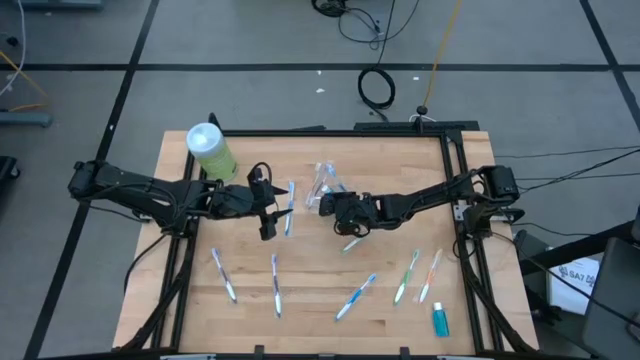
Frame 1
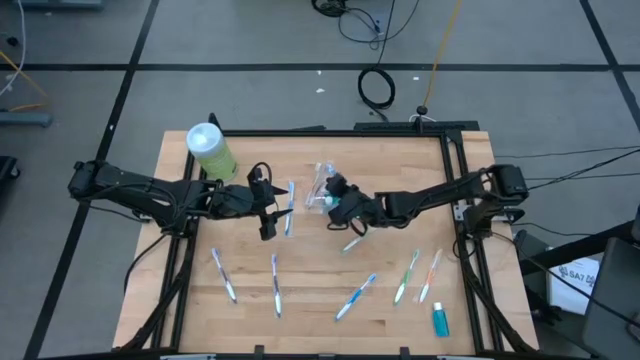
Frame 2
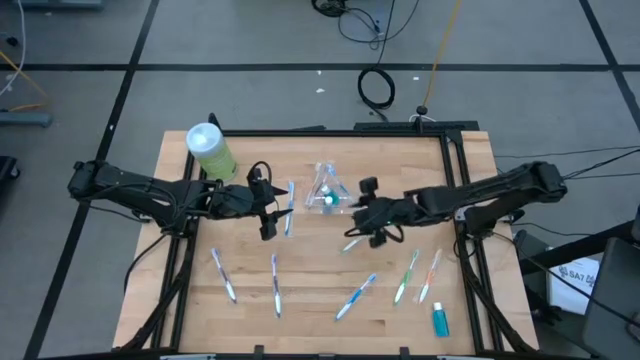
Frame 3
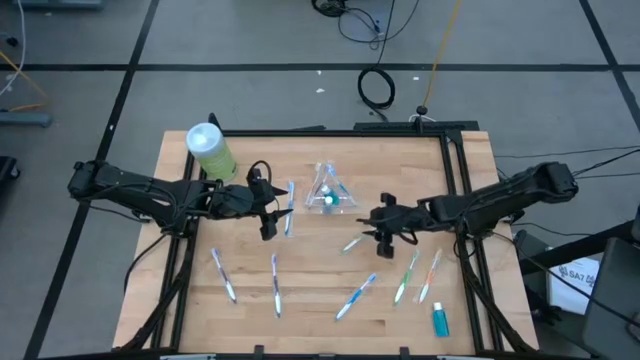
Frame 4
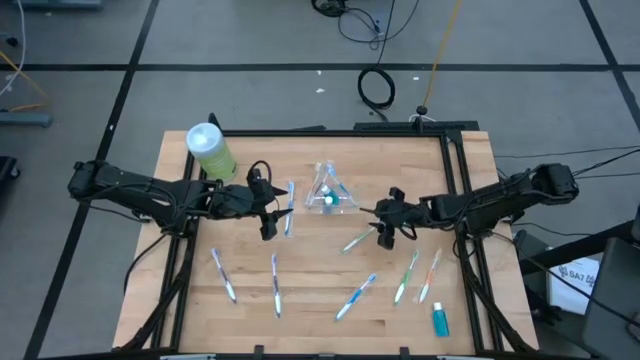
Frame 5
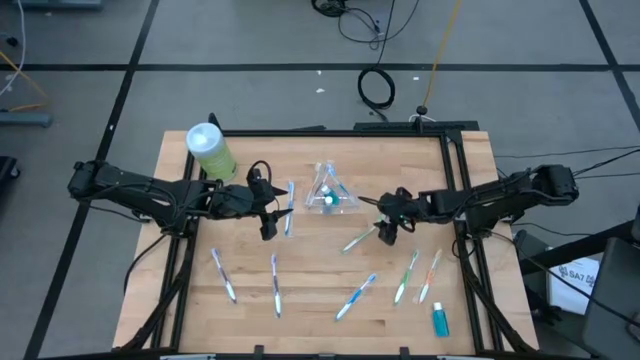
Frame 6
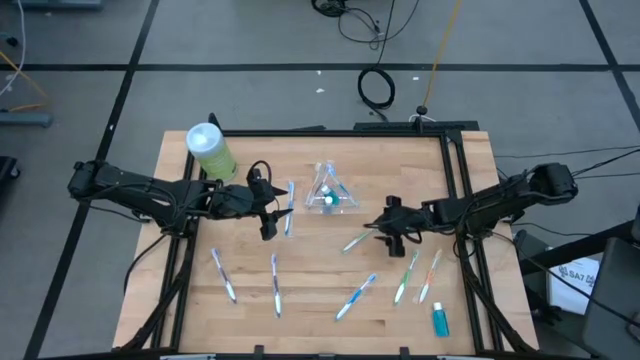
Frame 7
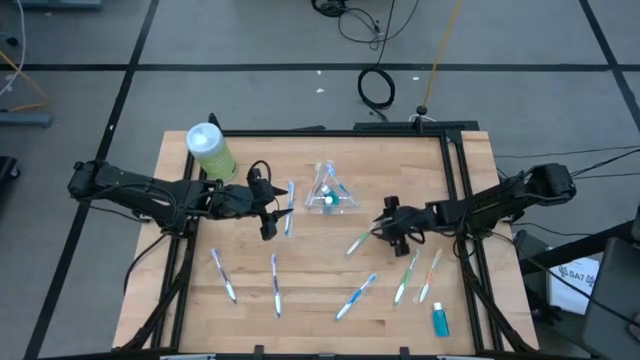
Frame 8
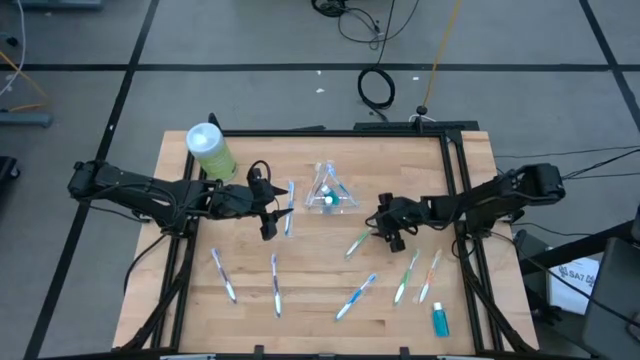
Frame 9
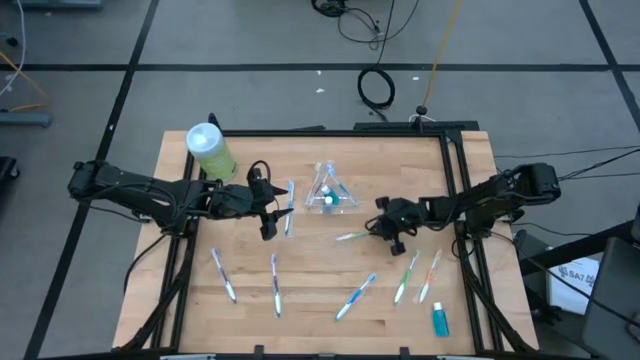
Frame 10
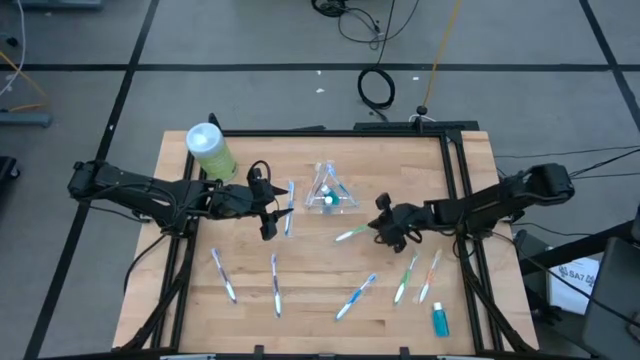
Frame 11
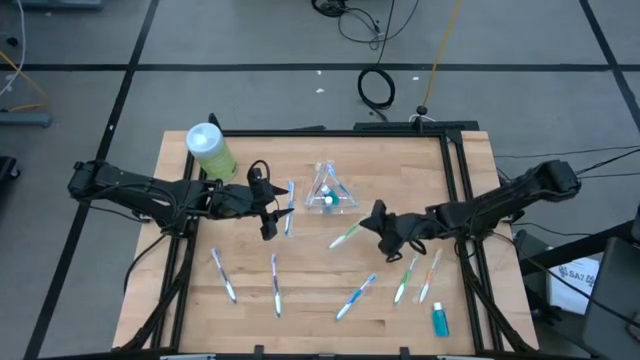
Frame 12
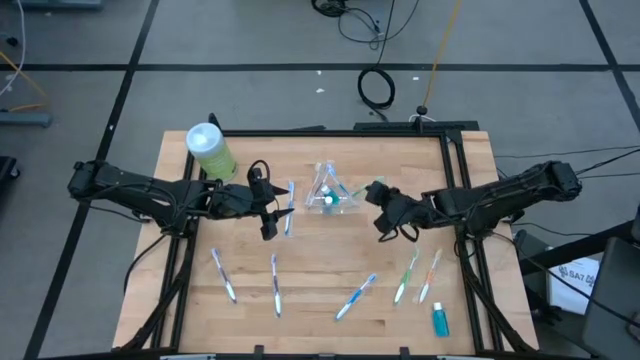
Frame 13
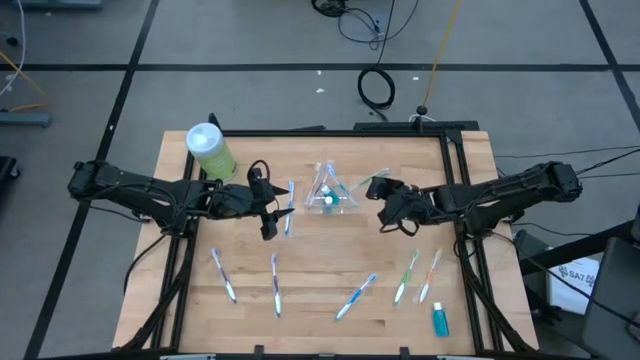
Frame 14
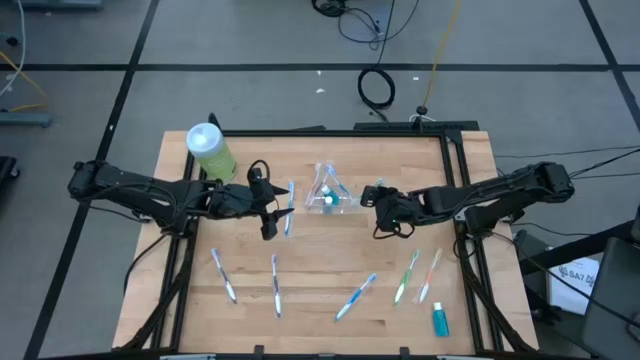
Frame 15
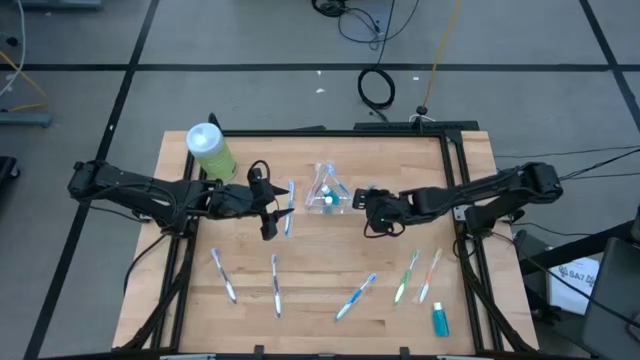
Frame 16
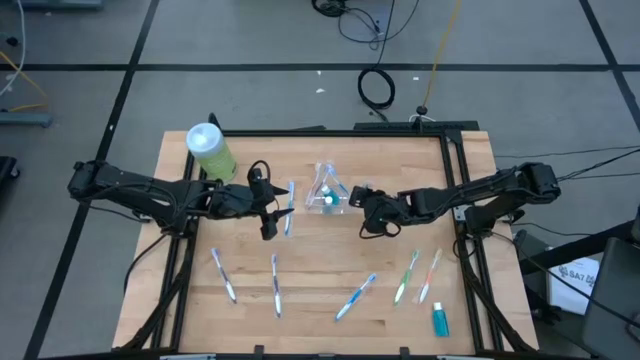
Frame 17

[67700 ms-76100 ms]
Task: Pick & Place toothbrushing station
Put the left green toothbrush into the right section of the transparent organizer

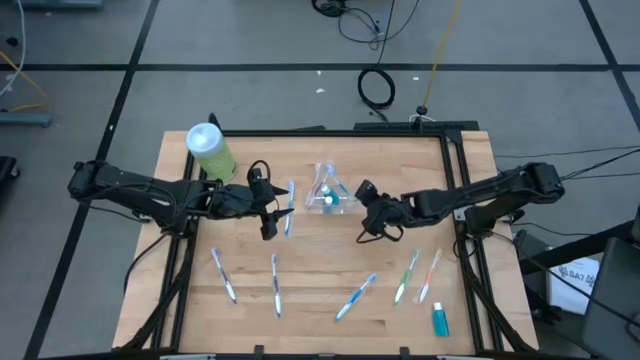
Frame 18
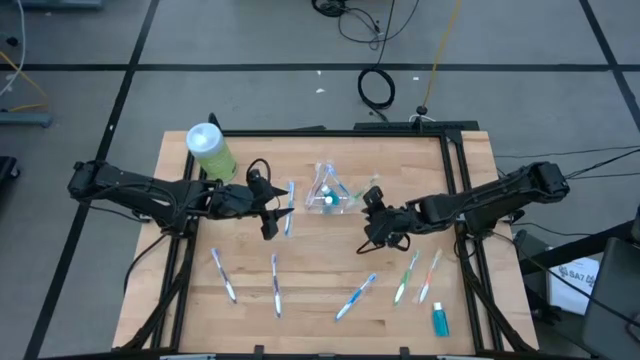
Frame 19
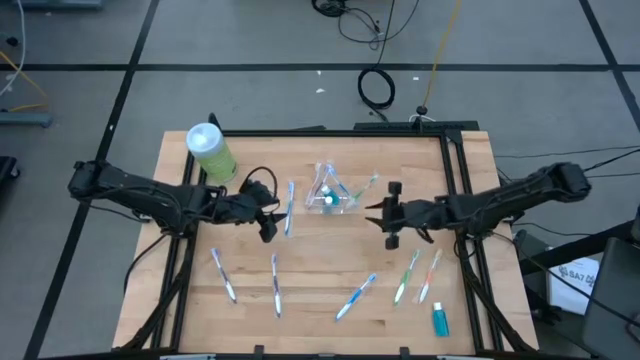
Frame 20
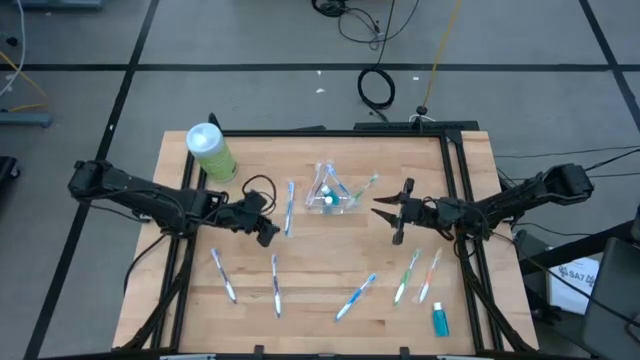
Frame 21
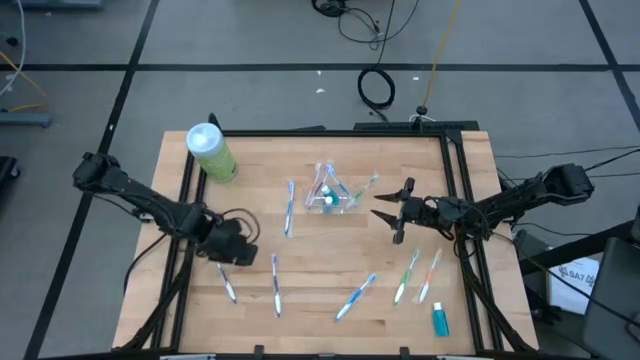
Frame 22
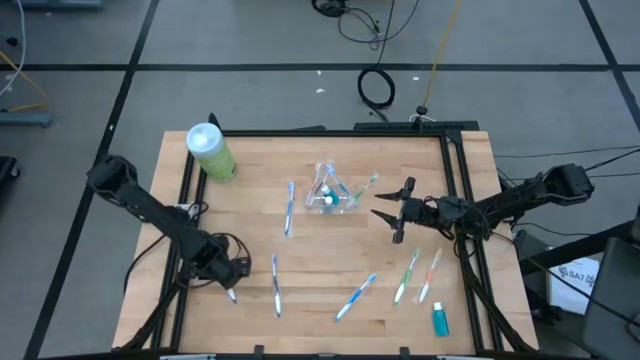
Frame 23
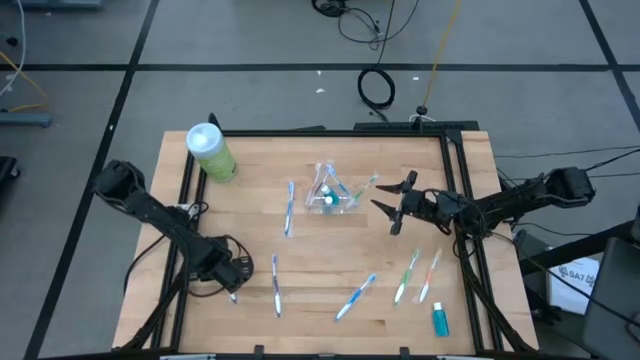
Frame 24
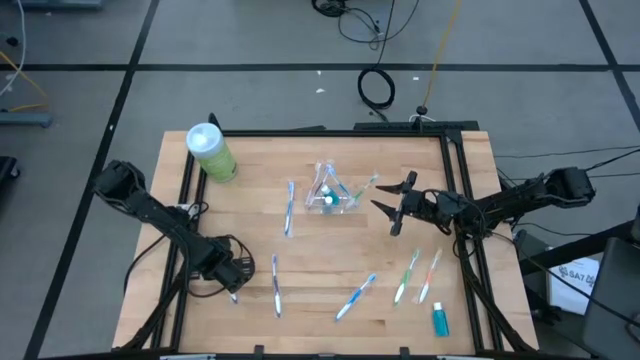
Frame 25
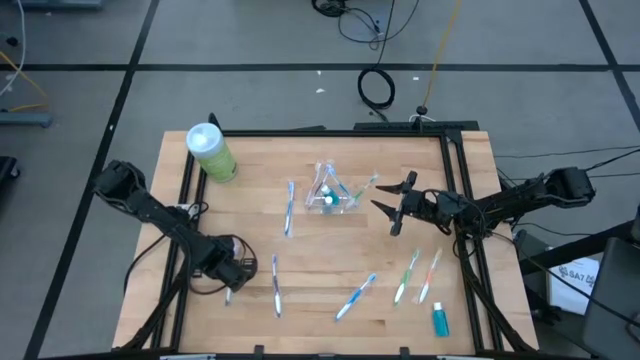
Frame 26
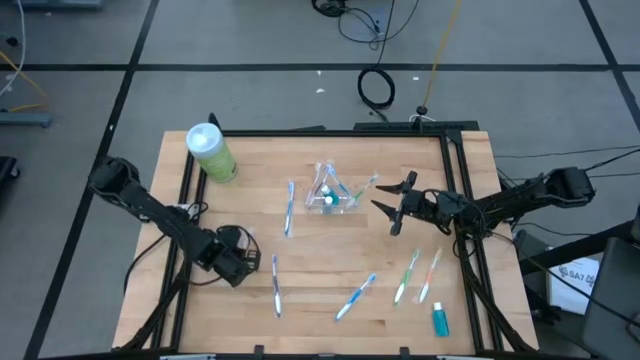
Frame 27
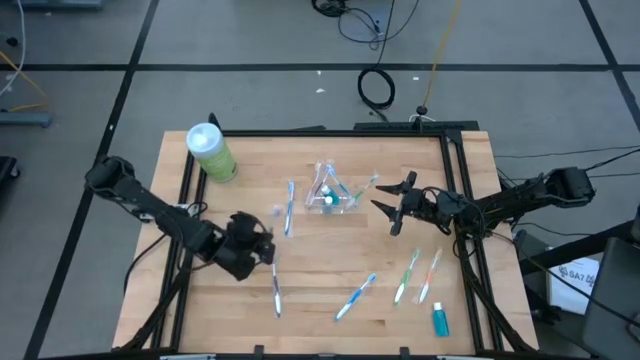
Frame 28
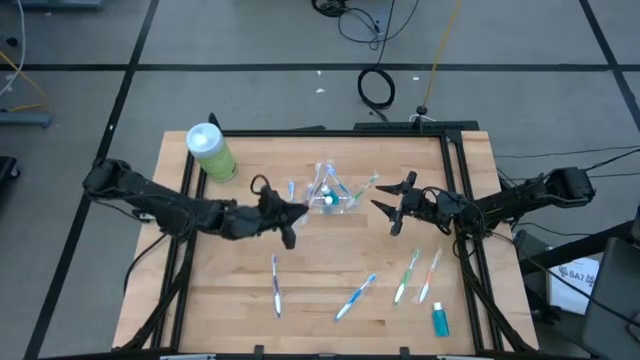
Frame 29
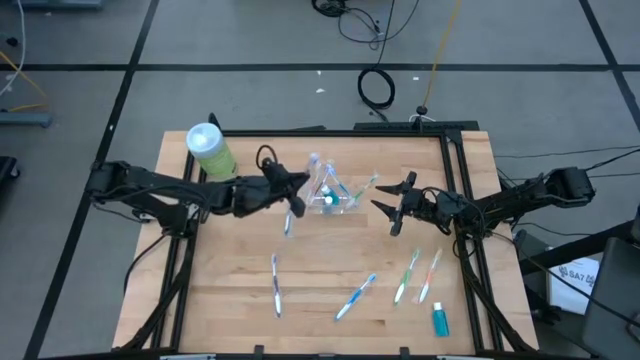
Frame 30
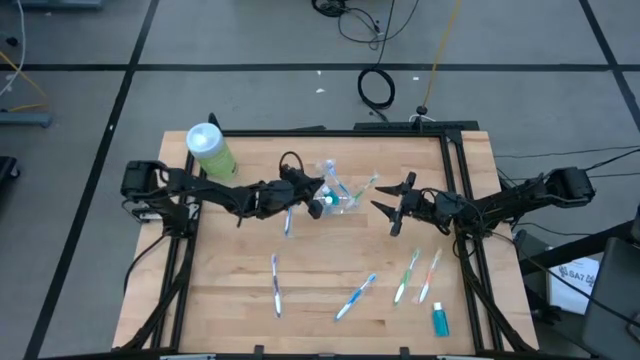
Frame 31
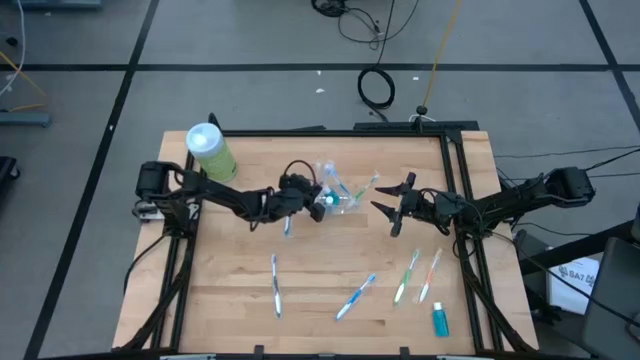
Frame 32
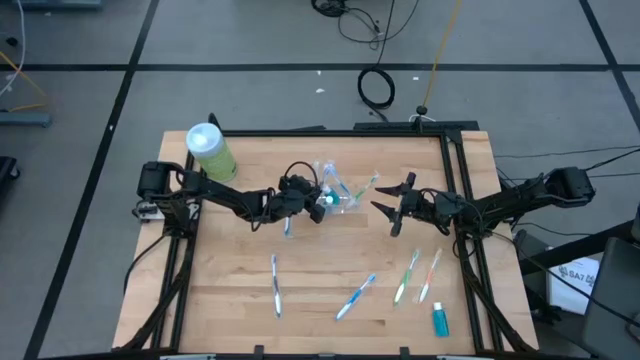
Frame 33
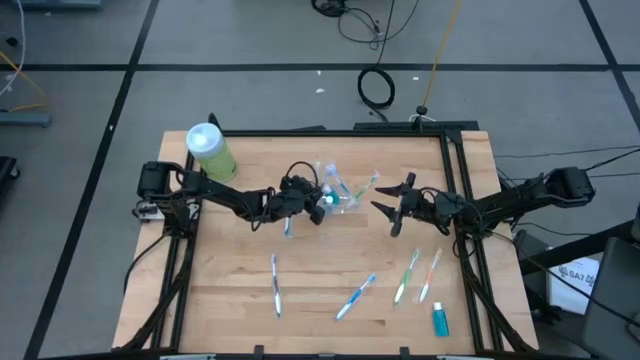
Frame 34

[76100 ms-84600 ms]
Put the right violet toothbrush into the left section of the transparent organizer

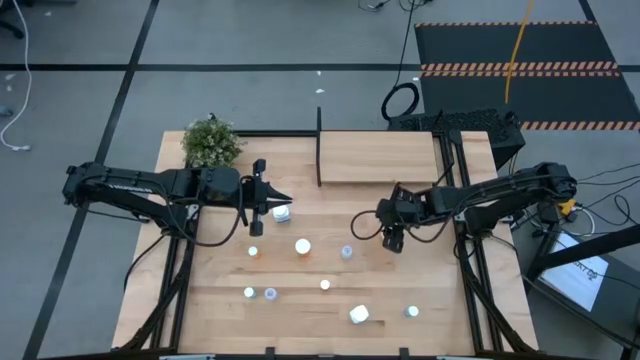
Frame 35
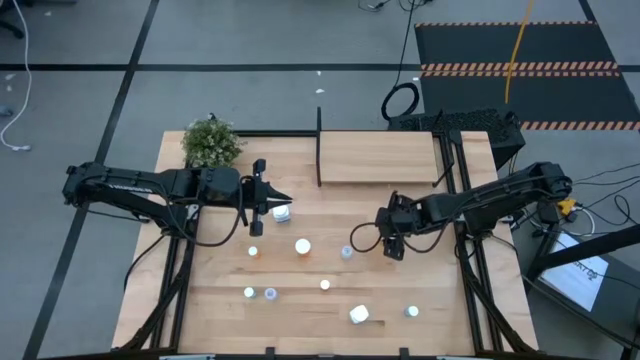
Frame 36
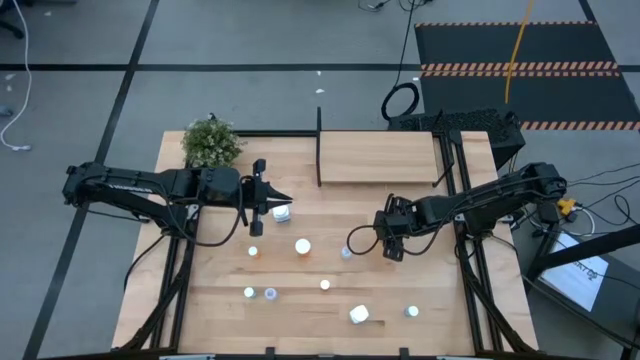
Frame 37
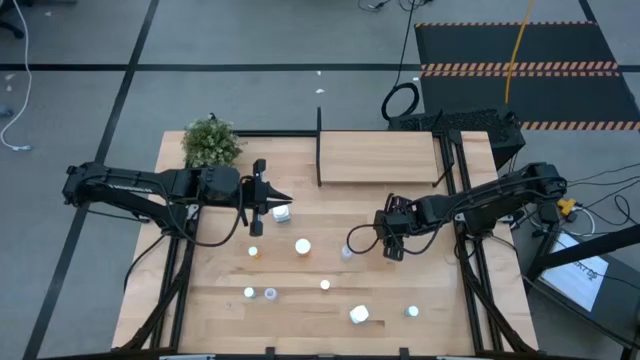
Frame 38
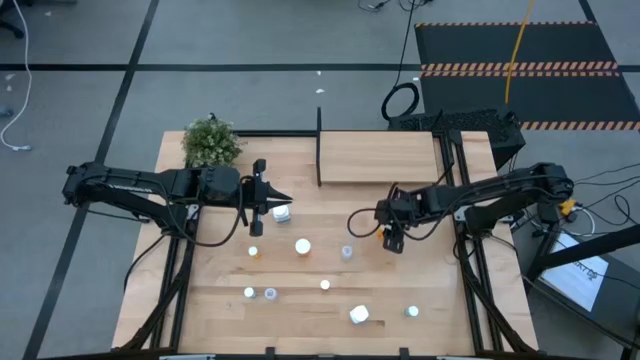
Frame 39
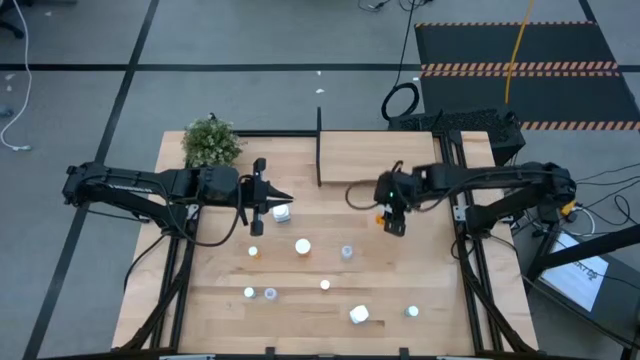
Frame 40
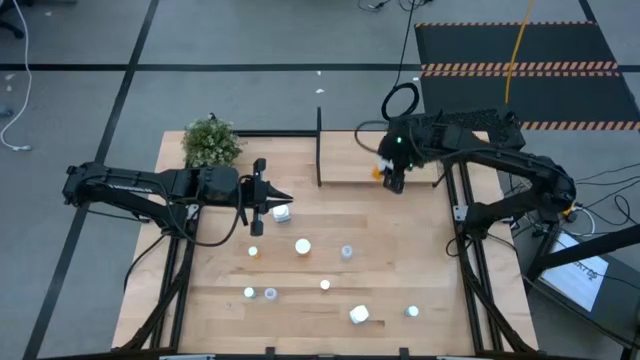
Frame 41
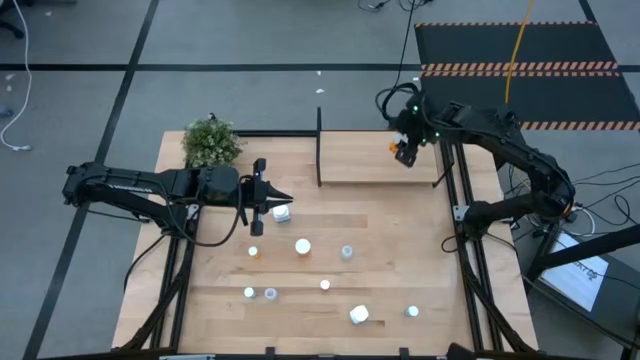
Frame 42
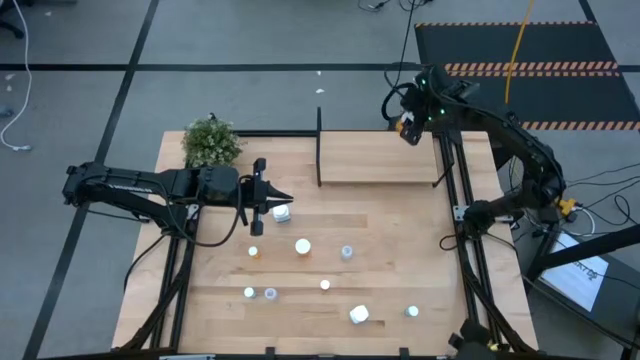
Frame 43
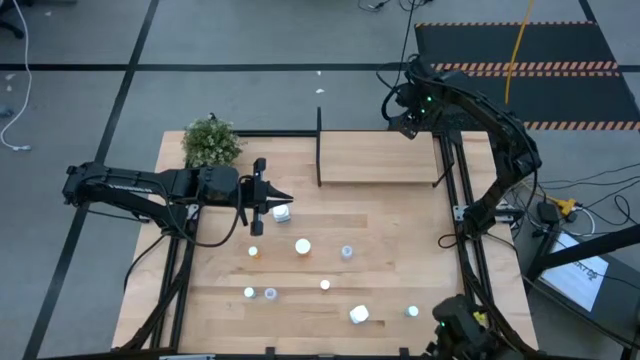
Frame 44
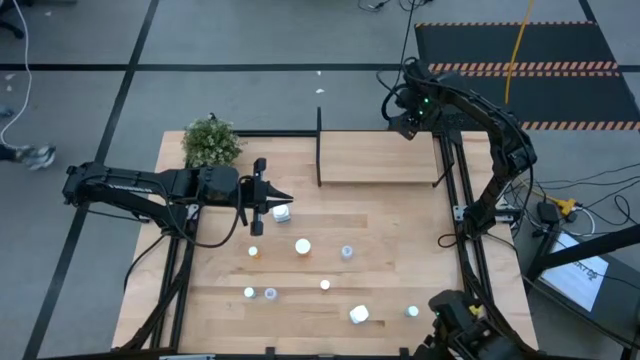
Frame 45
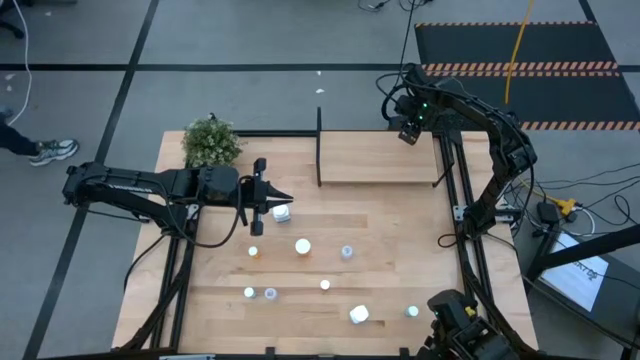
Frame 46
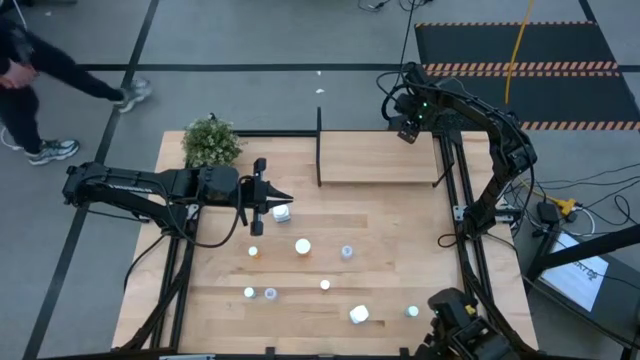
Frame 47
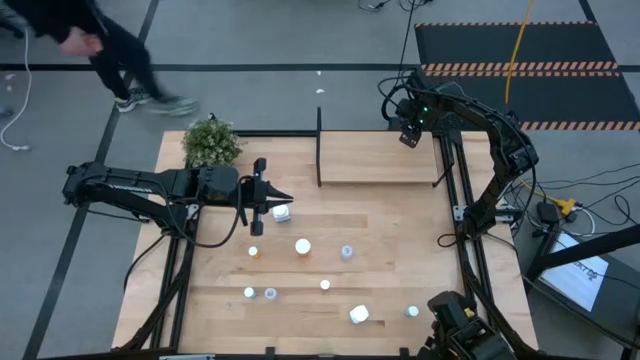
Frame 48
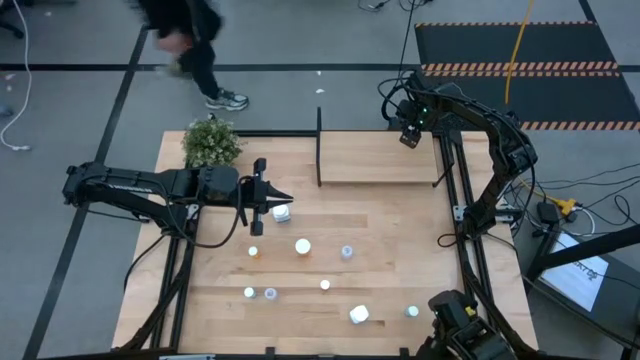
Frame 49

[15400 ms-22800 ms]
Task: Pick and place medicine bottles onto shelf by color
Put the right large orange pill bottle on the shelf
